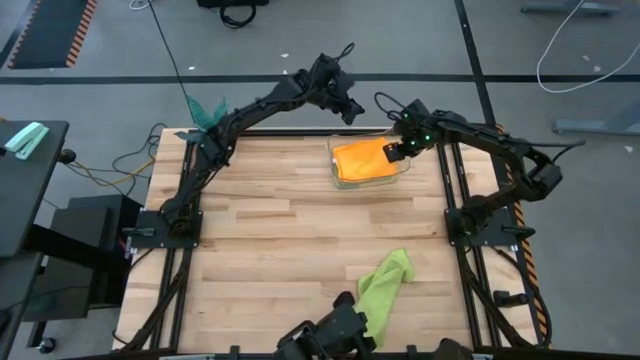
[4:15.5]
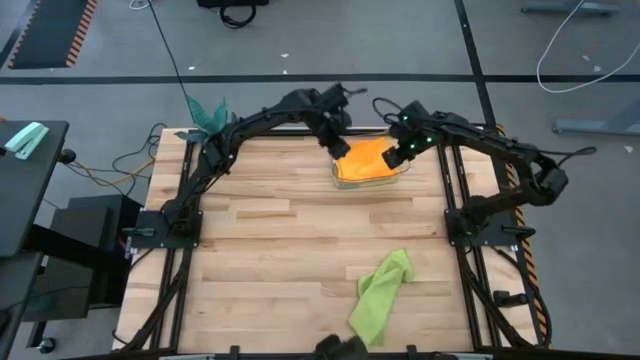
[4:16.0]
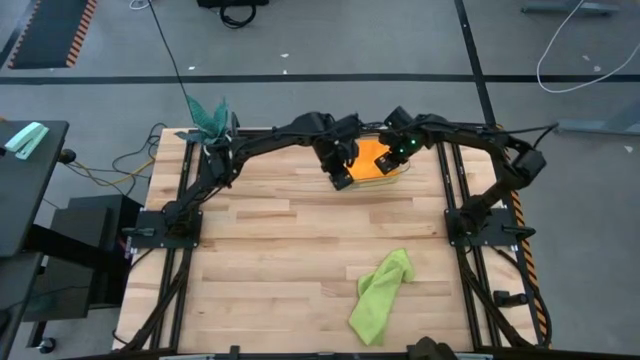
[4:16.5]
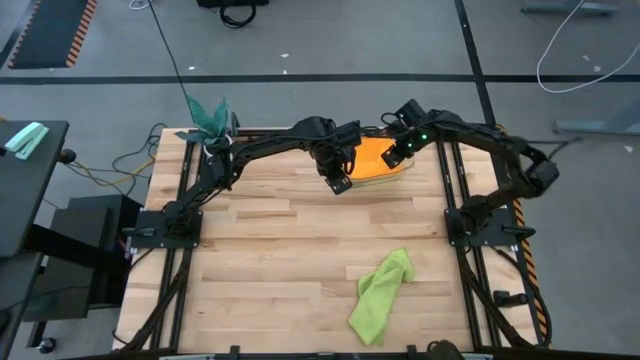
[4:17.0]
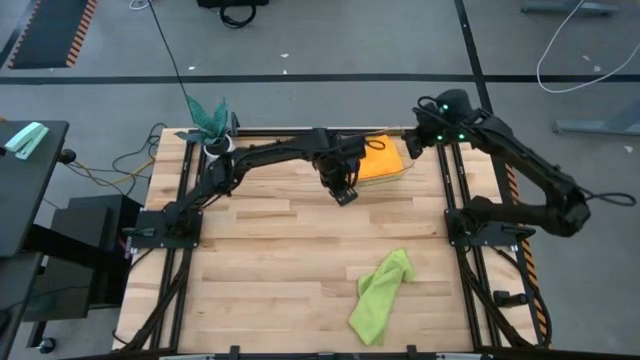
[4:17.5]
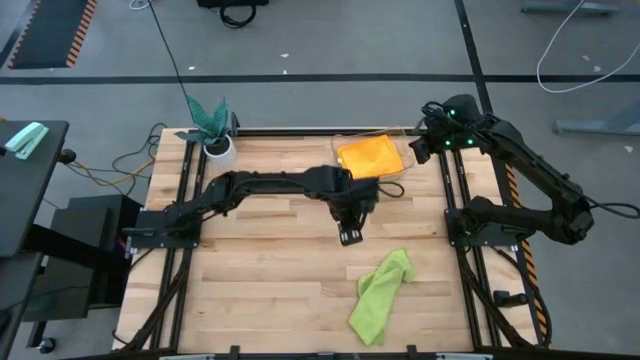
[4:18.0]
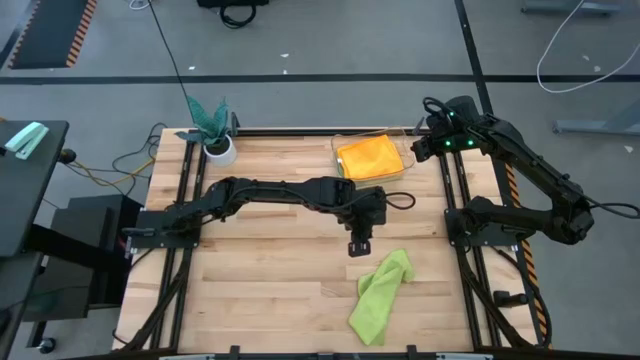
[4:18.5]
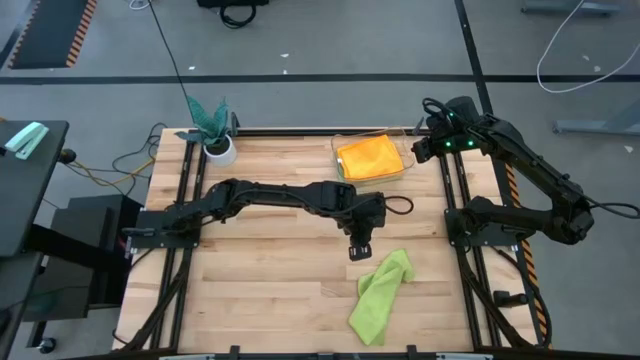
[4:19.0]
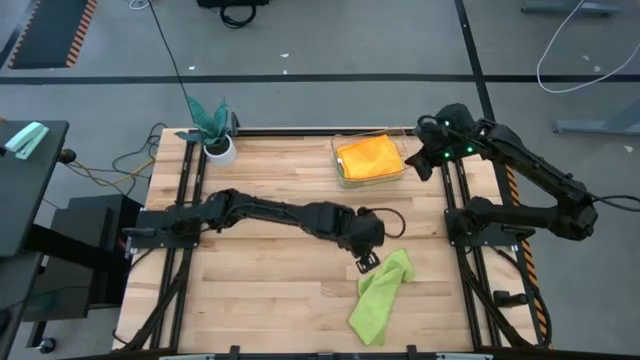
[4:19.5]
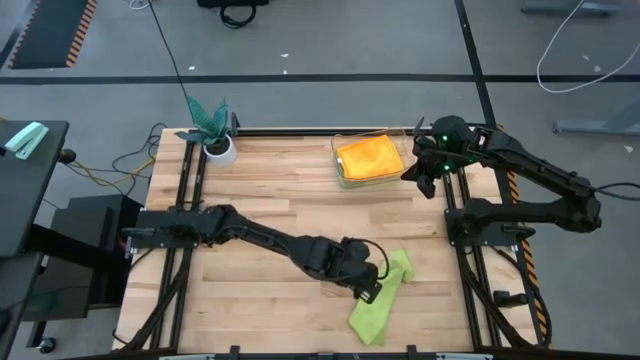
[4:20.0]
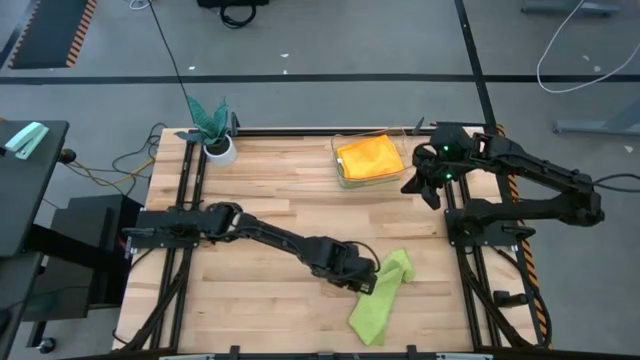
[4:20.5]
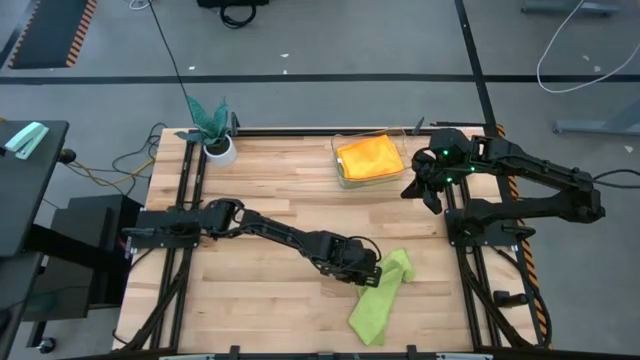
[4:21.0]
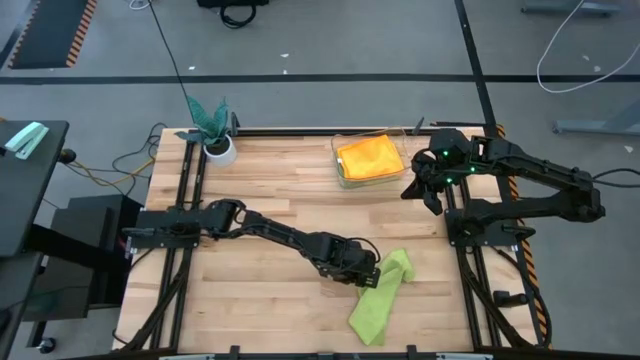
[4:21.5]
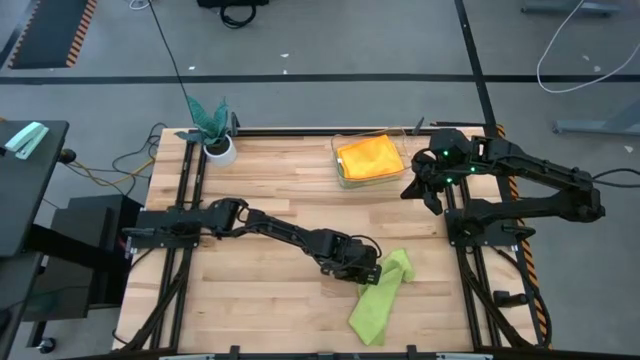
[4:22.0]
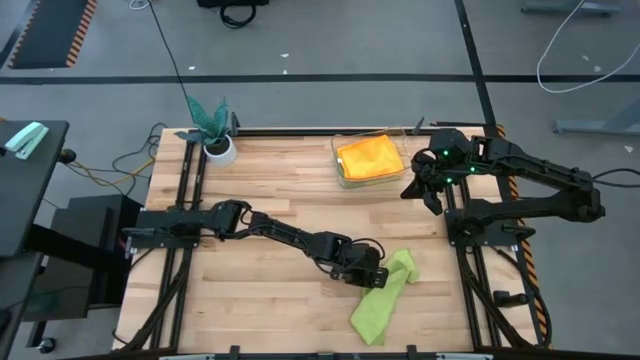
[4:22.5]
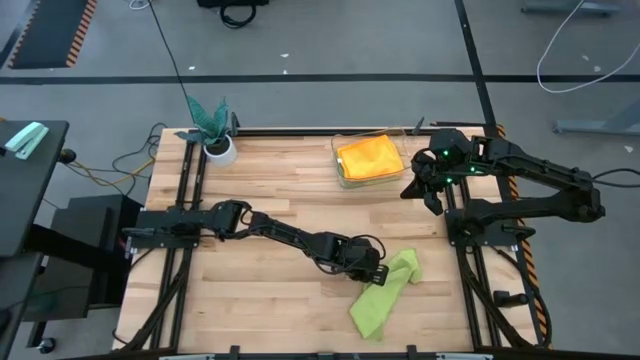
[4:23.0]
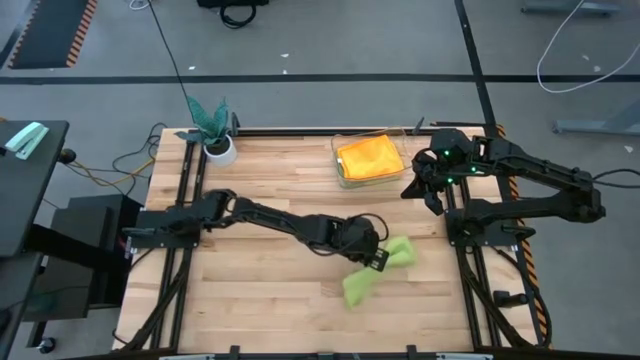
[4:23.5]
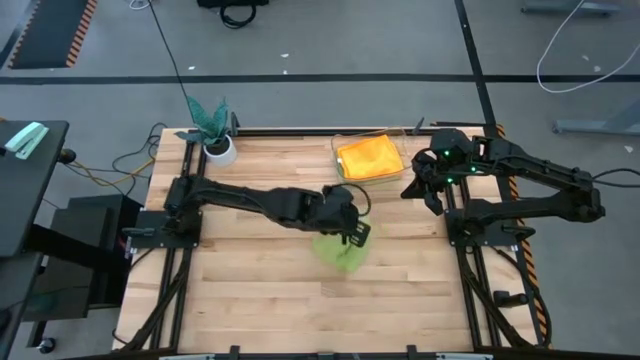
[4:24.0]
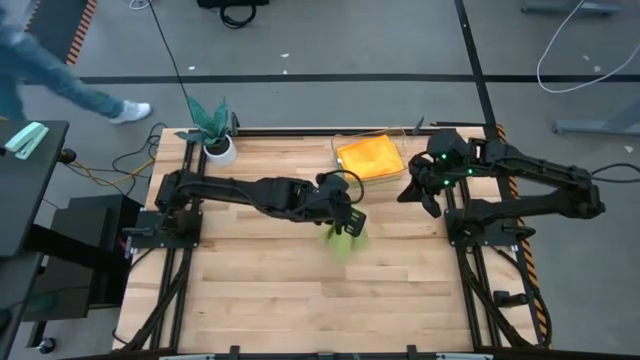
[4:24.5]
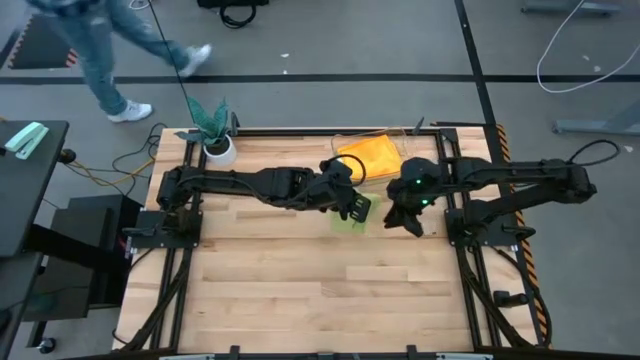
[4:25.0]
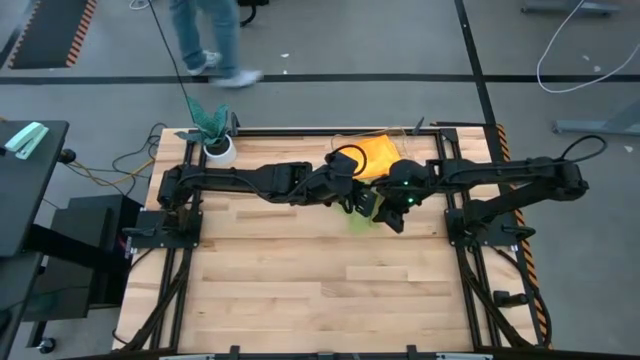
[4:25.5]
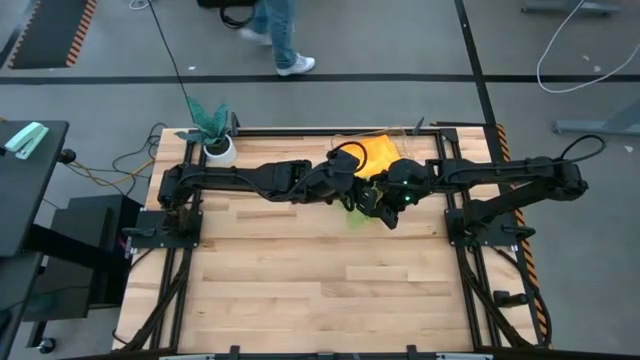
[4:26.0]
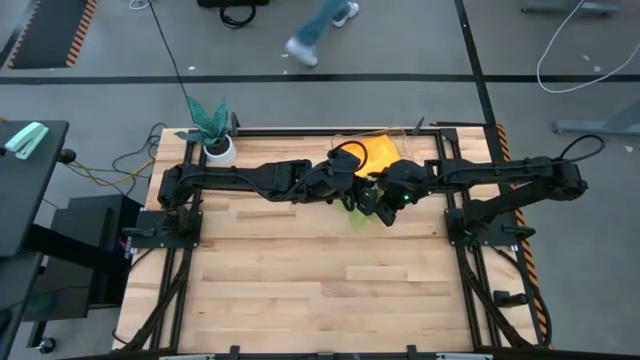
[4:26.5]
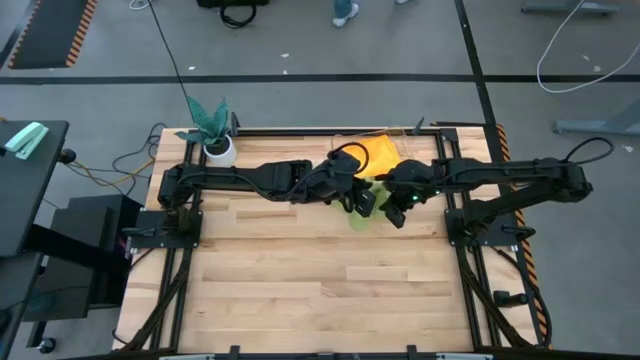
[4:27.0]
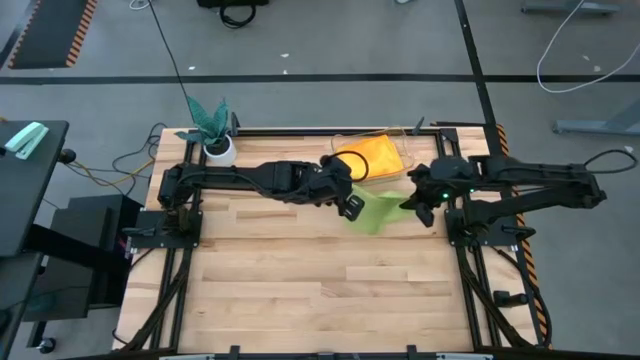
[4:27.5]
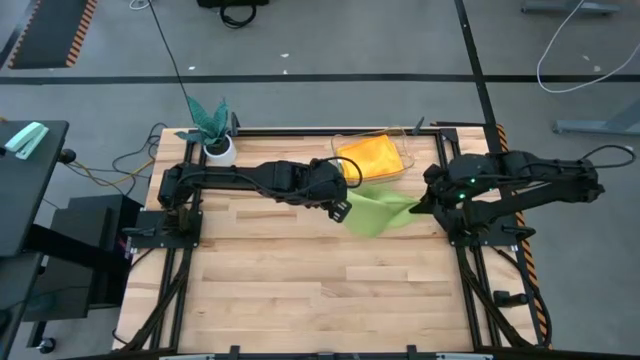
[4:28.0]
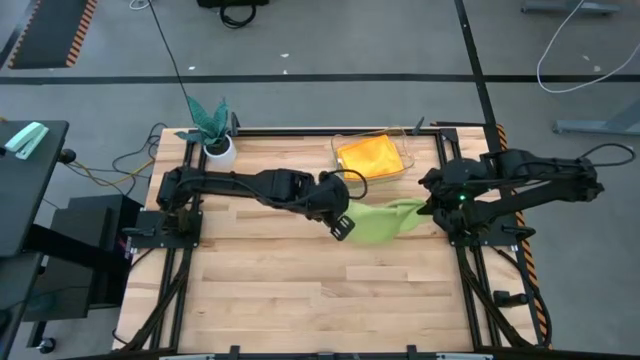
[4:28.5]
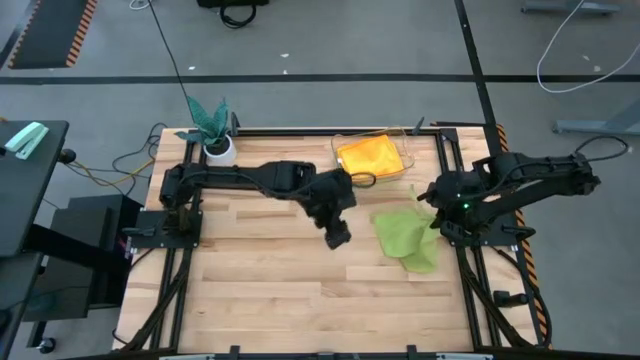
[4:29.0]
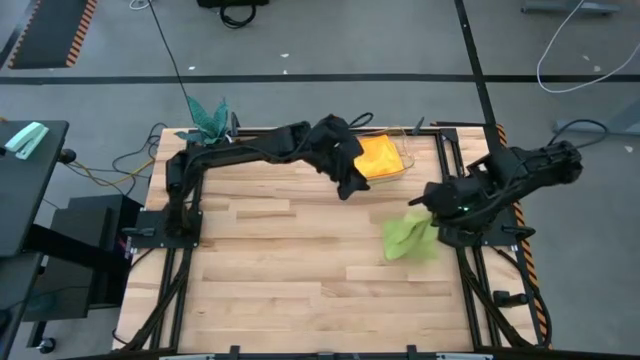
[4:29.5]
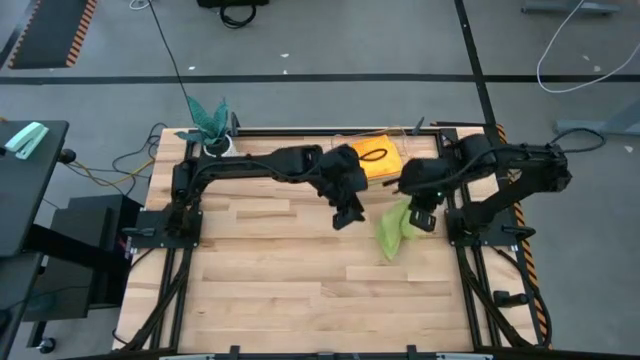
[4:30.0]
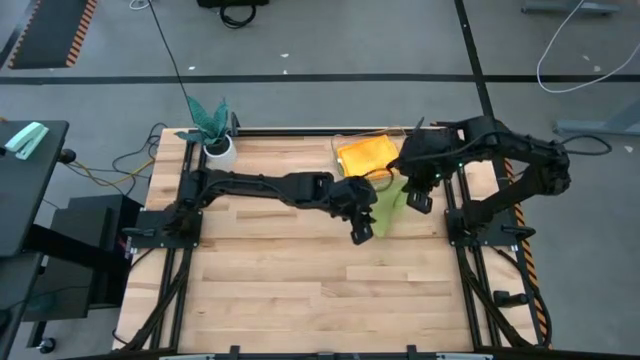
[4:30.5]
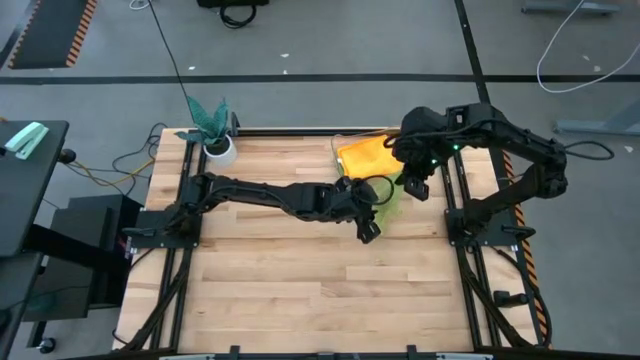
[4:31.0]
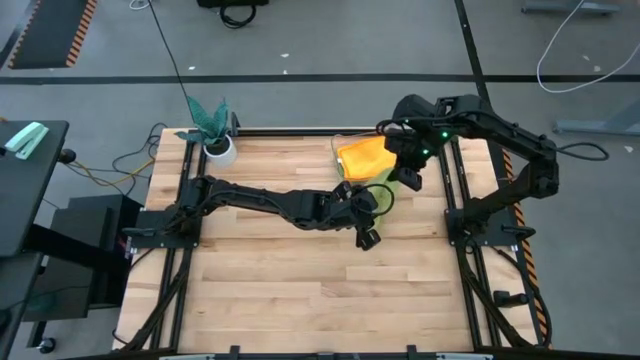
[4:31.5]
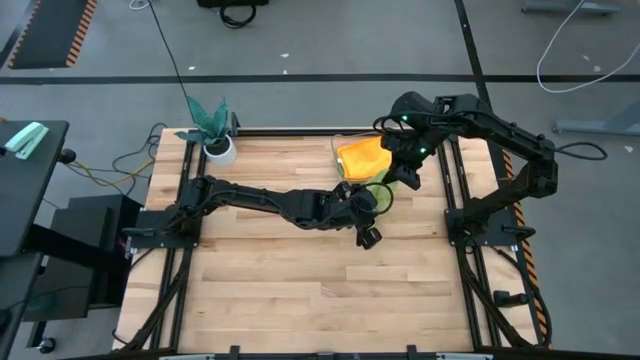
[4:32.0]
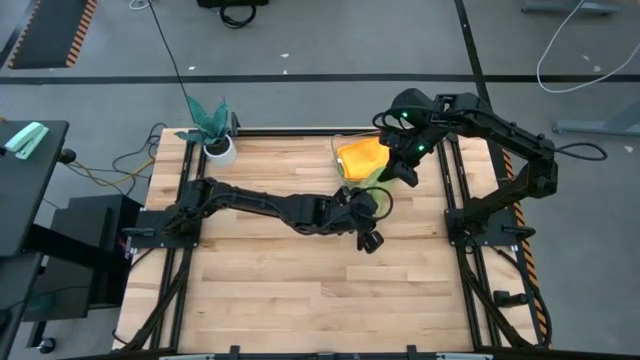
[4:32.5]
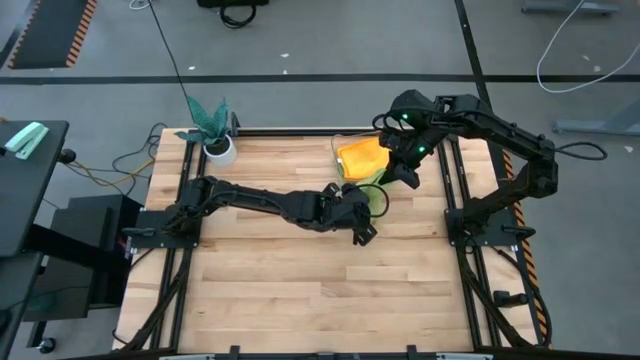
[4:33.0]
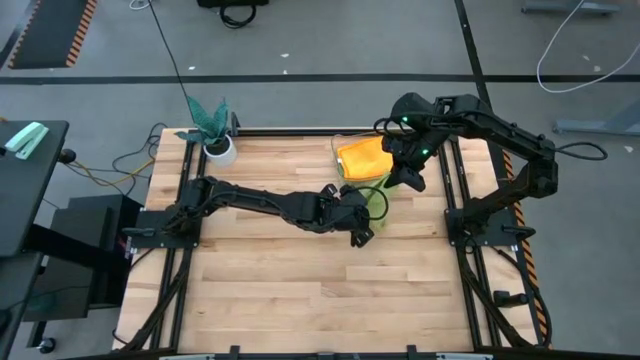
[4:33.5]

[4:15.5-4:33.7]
Task: Fold microfiber towels
Fold the light green towel

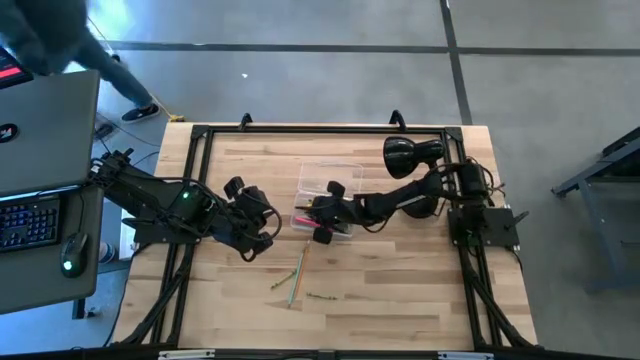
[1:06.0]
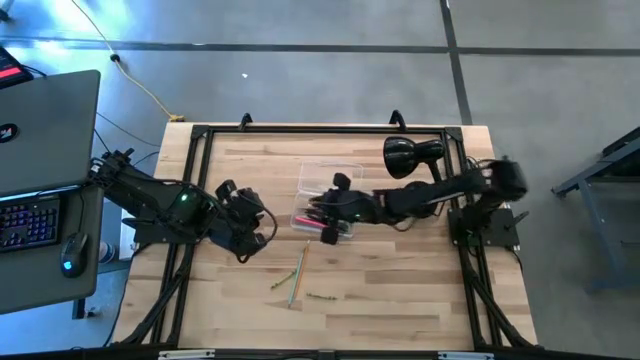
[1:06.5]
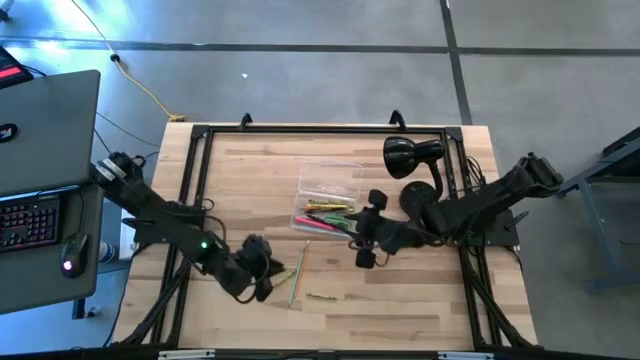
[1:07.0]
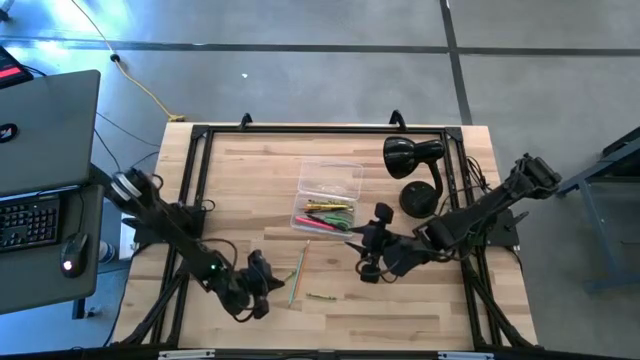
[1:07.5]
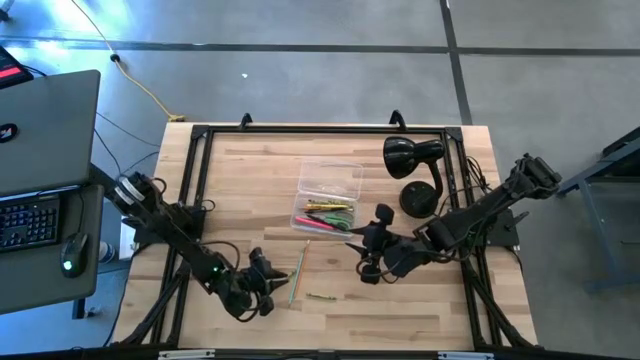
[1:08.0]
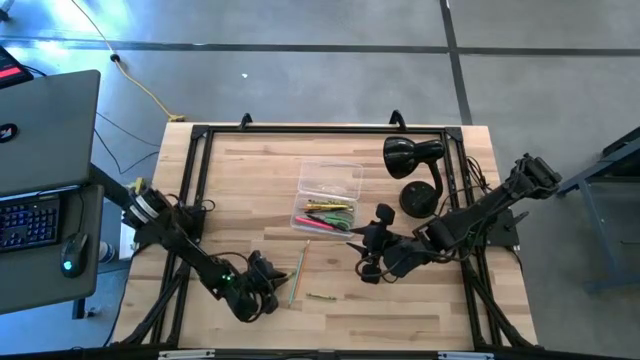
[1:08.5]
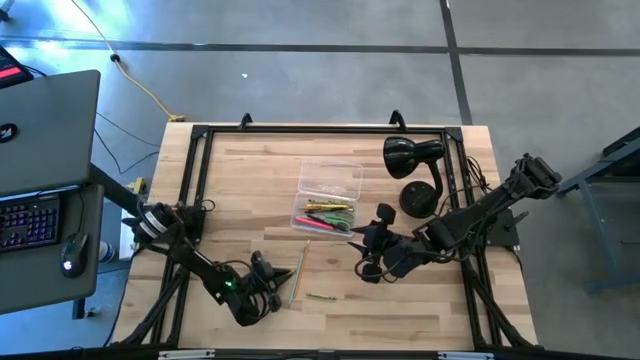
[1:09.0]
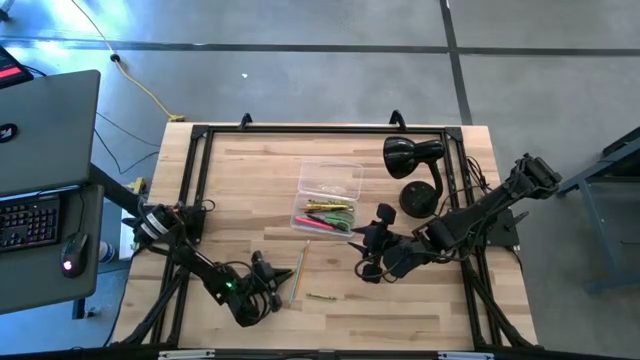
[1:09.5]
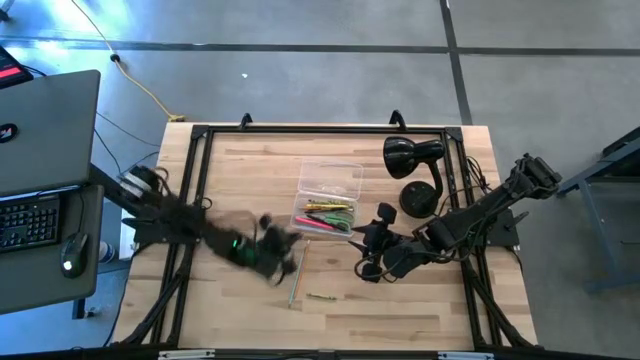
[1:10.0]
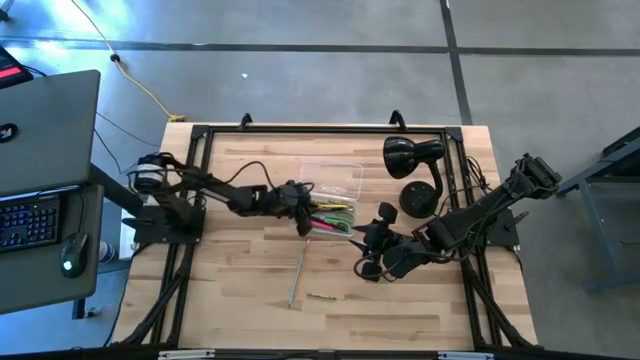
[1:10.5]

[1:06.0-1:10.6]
Task: Pick & place school supplies into a supply box
Put the left green crayon into the transparent supply box
